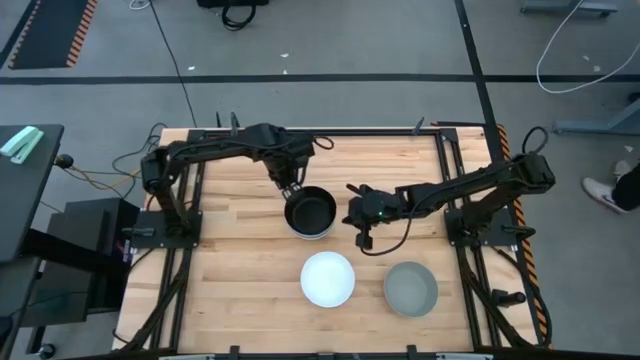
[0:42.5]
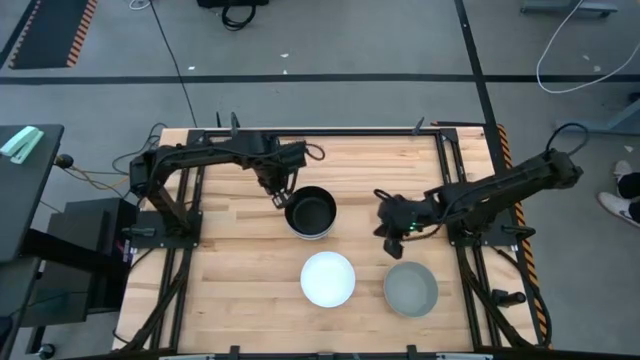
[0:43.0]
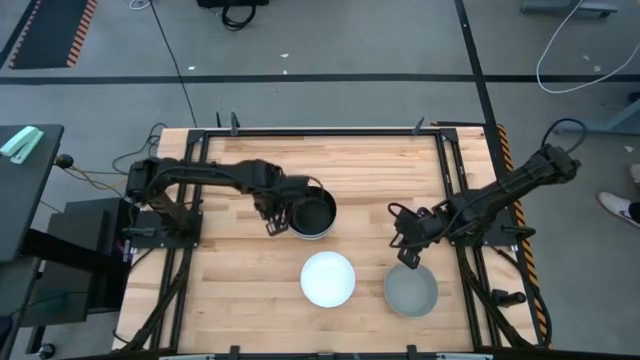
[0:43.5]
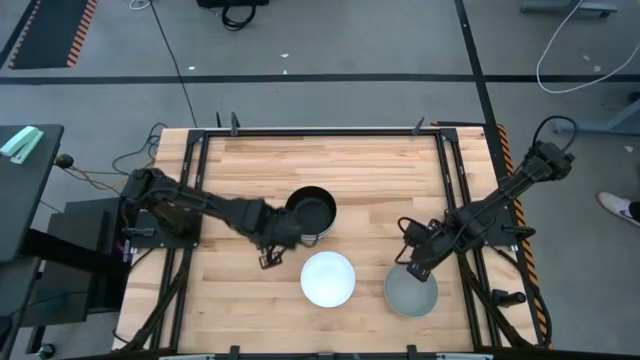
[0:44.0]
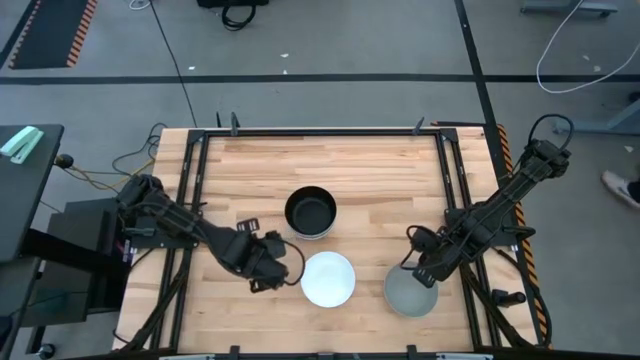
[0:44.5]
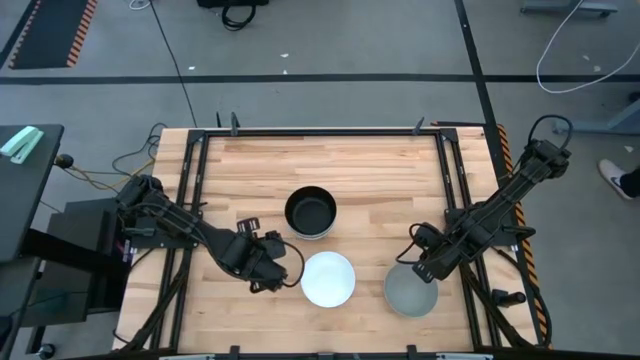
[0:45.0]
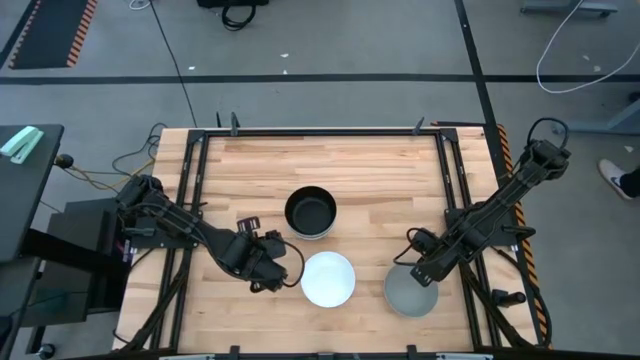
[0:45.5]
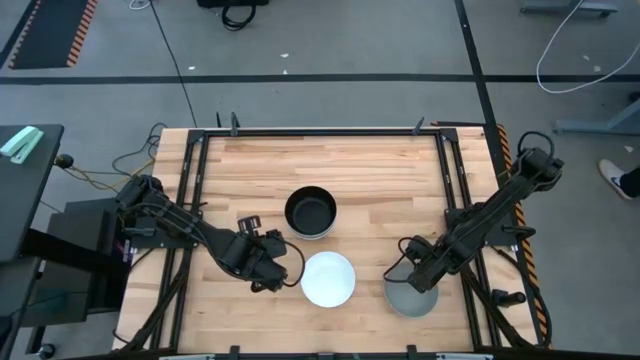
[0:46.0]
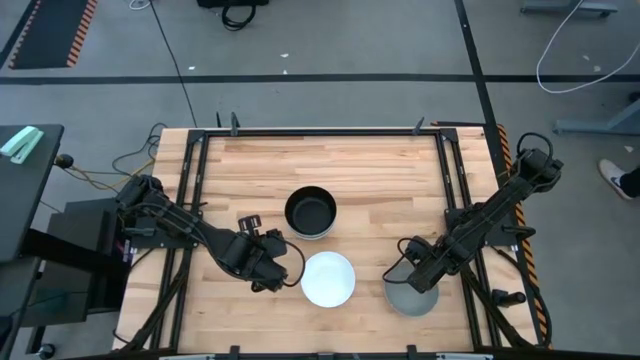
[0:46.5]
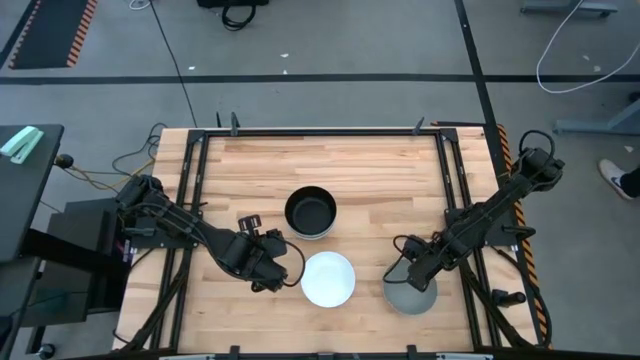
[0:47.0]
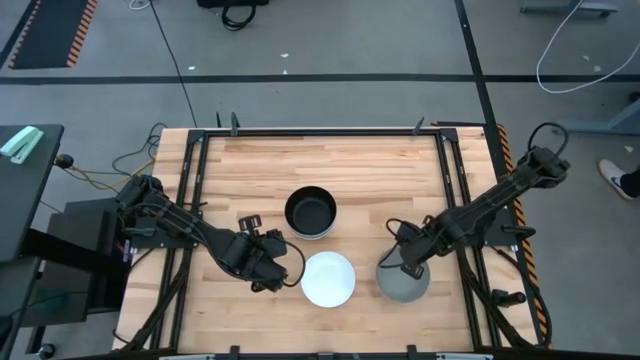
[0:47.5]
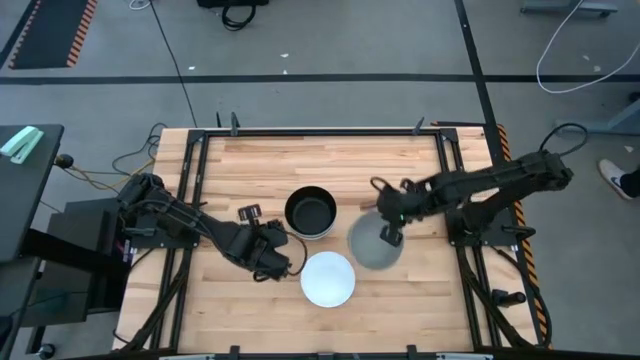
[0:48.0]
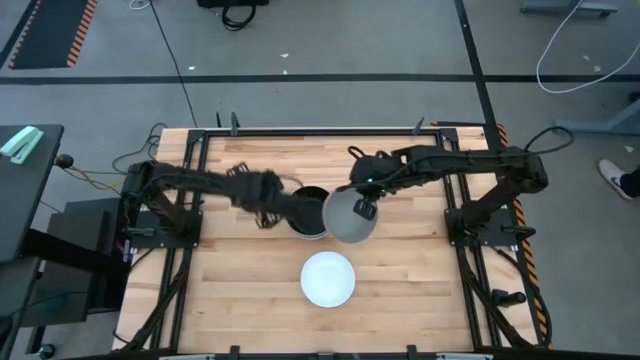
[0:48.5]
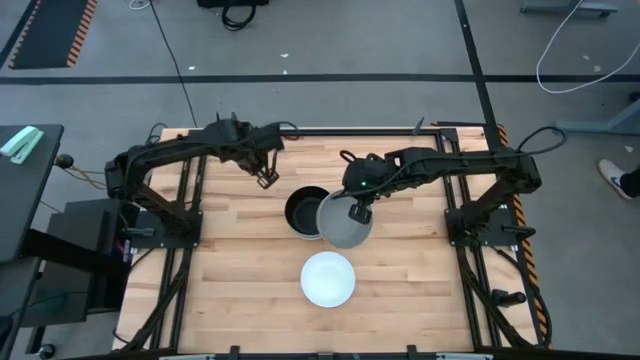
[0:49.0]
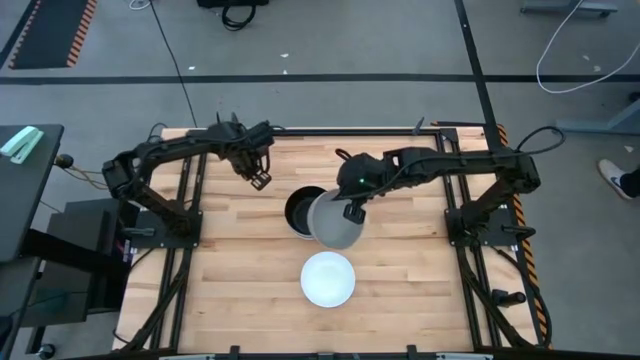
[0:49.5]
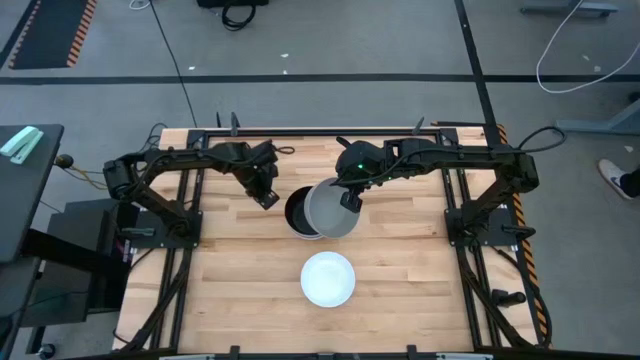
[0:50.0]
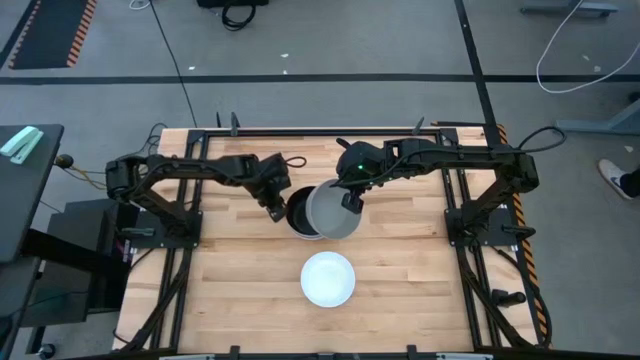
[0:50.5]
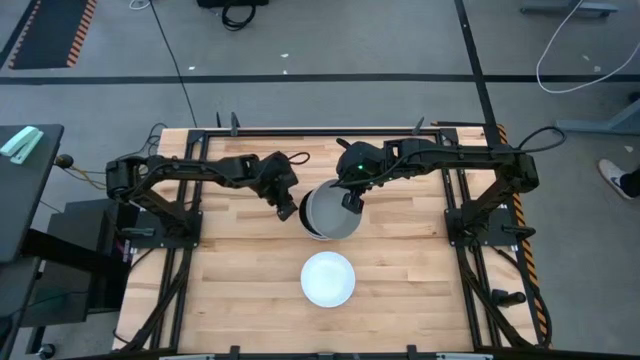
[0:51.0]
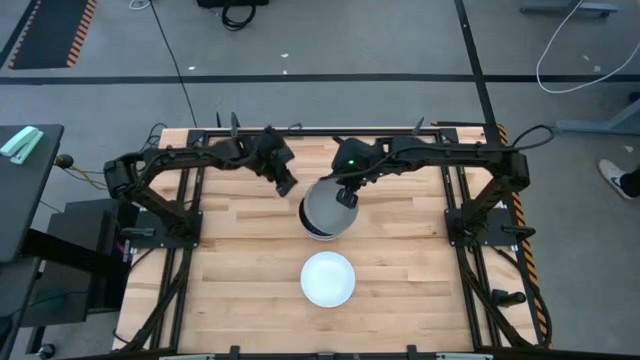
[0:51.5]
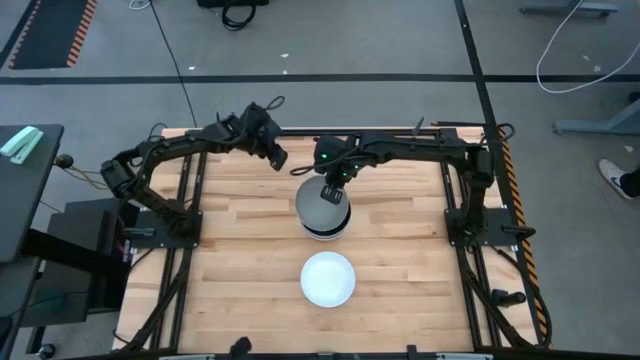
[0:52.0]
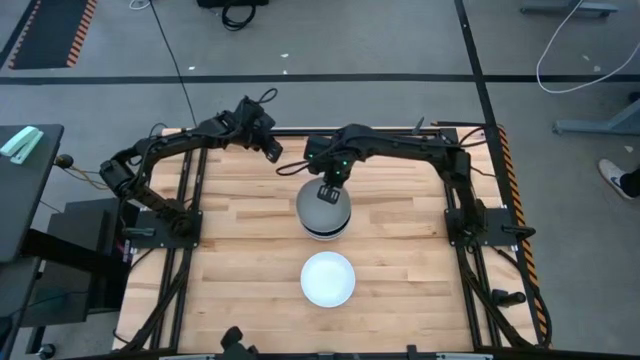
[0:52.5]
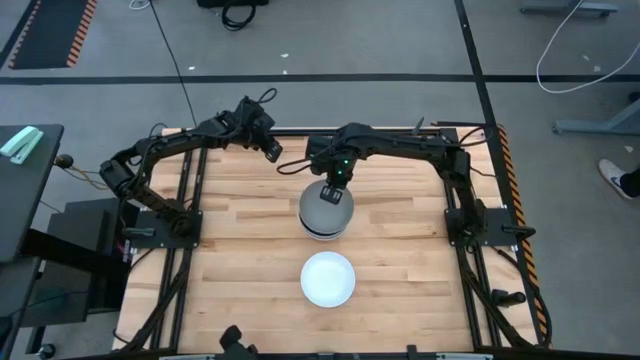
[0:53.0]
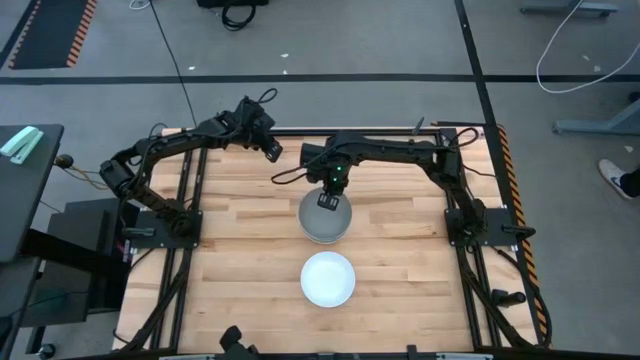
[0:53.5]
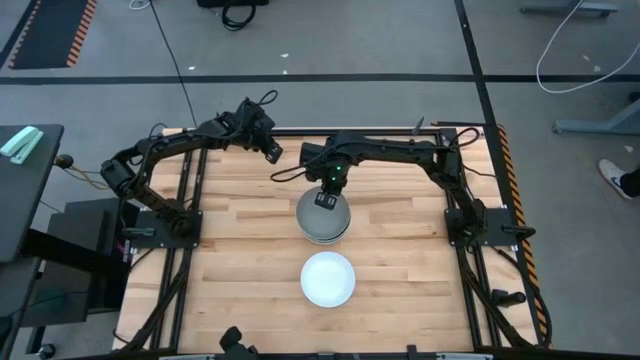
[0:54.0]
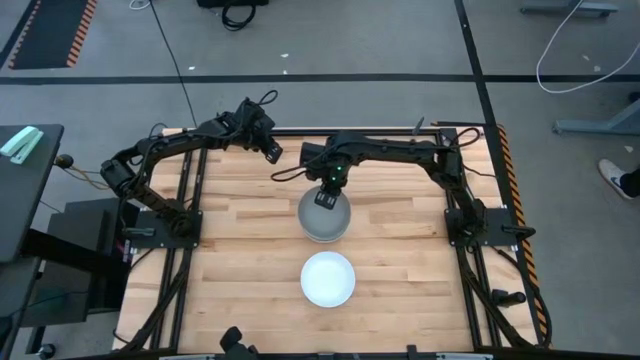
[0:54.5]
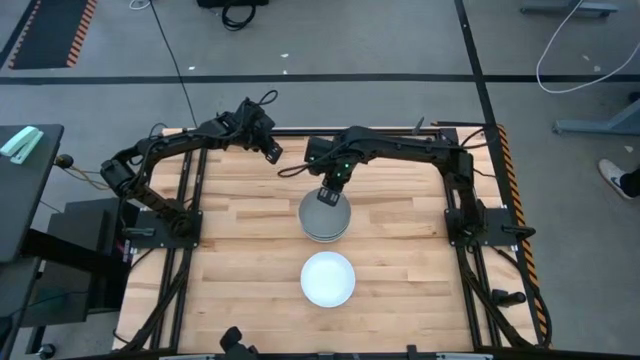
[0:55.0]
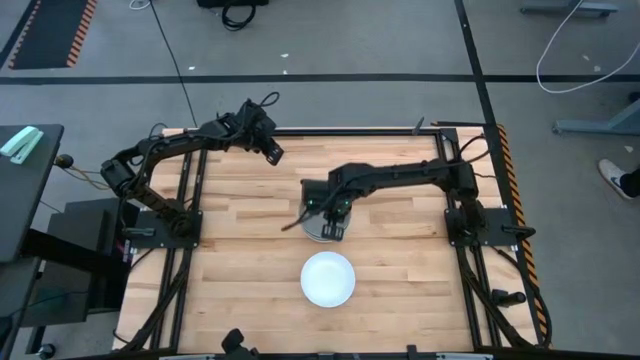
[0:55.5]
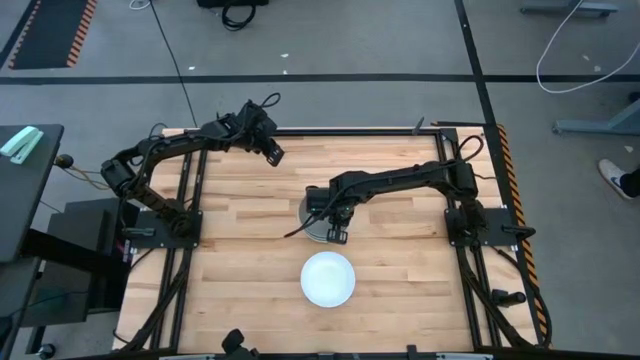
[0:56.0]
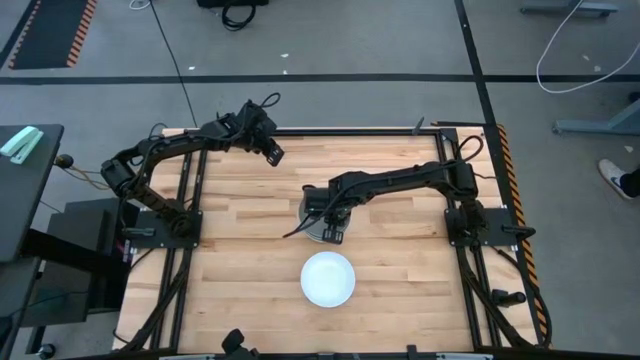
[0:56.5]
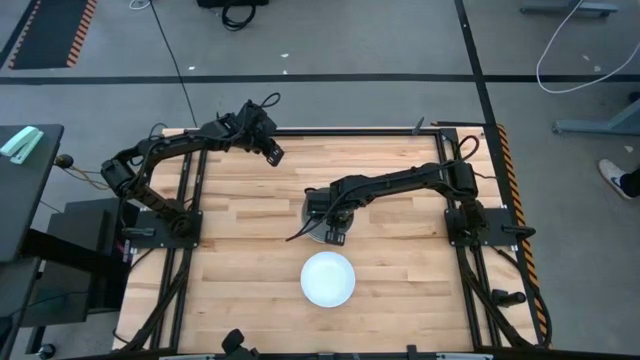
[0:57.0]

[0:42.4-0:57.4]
Task: Nest bowls inside each other
Stack the gray bowl on the black bowl

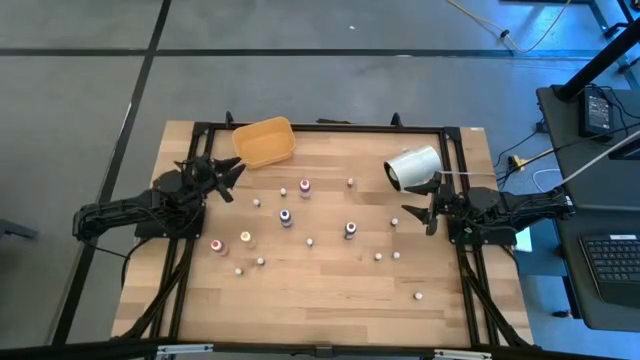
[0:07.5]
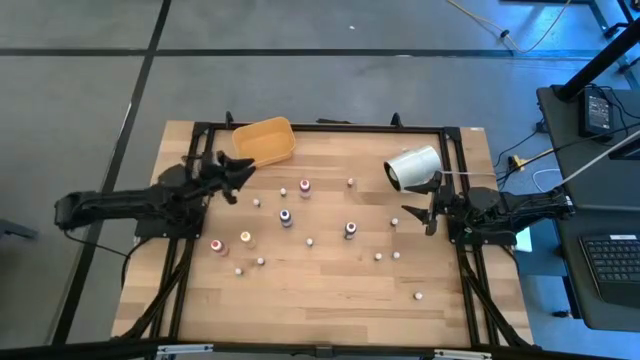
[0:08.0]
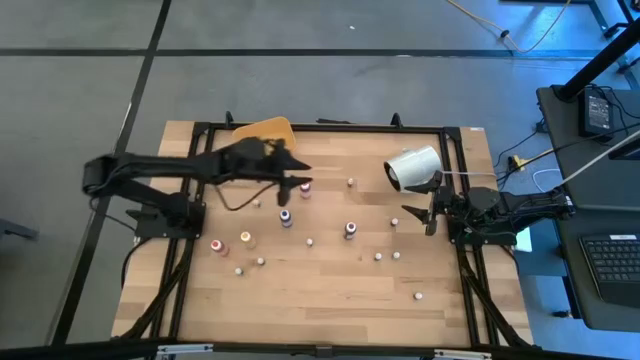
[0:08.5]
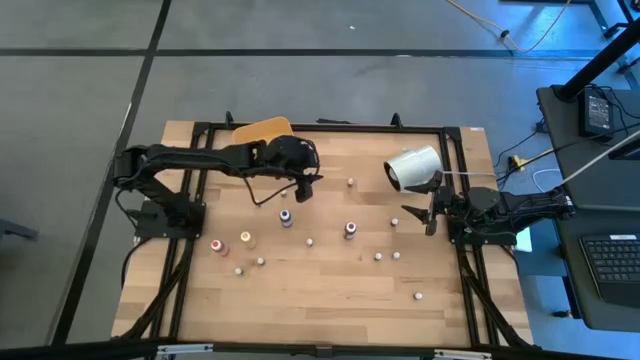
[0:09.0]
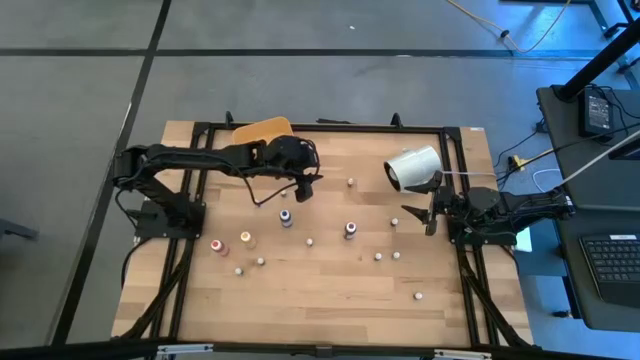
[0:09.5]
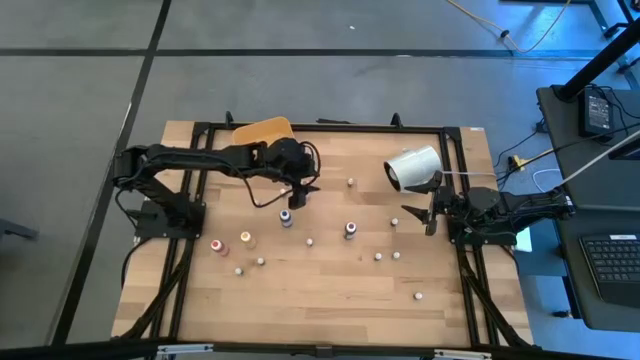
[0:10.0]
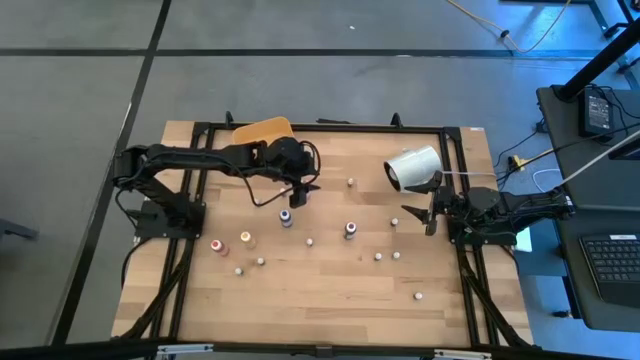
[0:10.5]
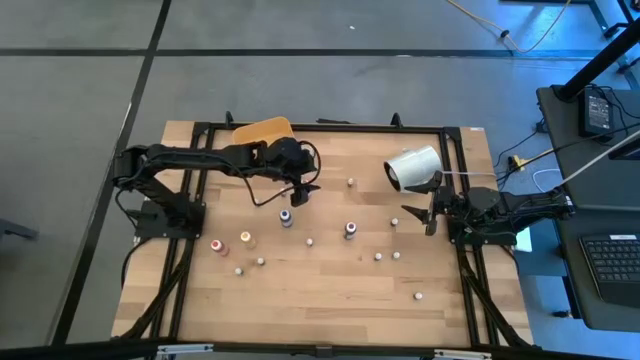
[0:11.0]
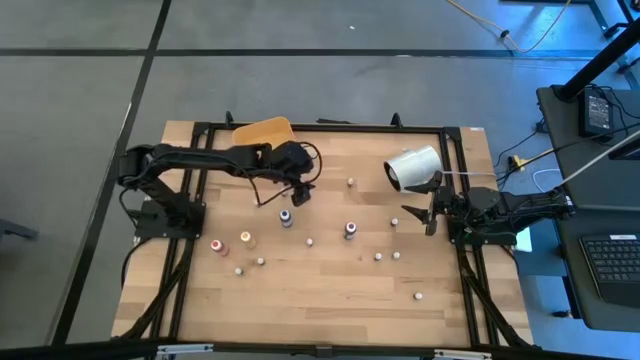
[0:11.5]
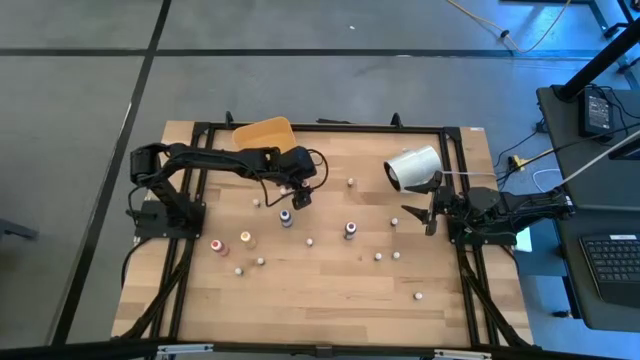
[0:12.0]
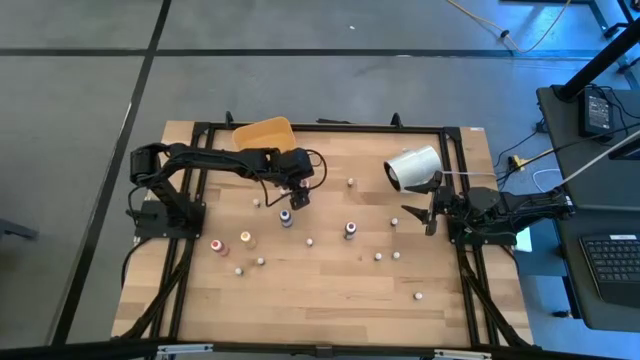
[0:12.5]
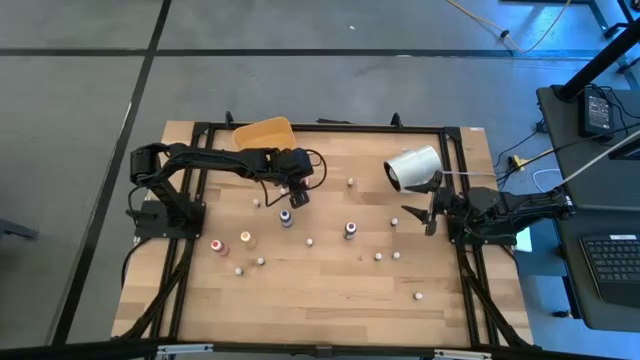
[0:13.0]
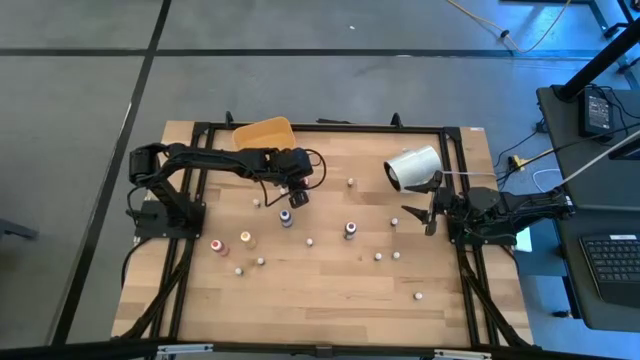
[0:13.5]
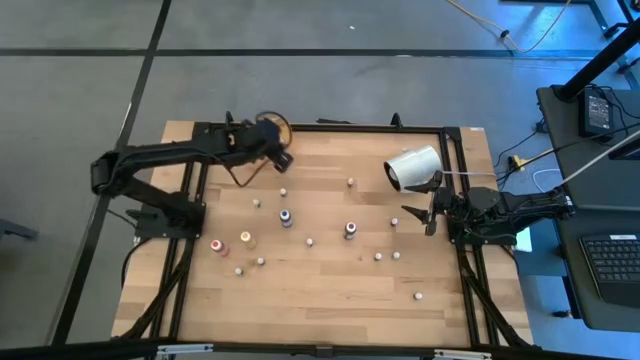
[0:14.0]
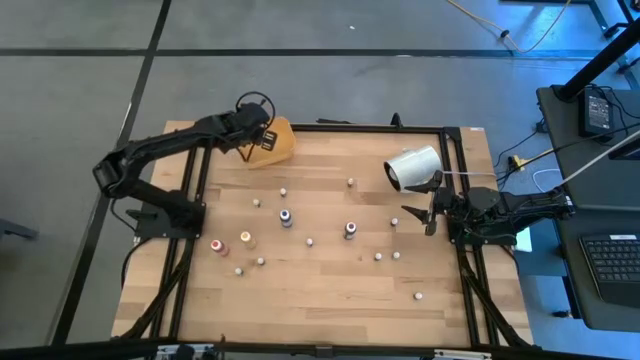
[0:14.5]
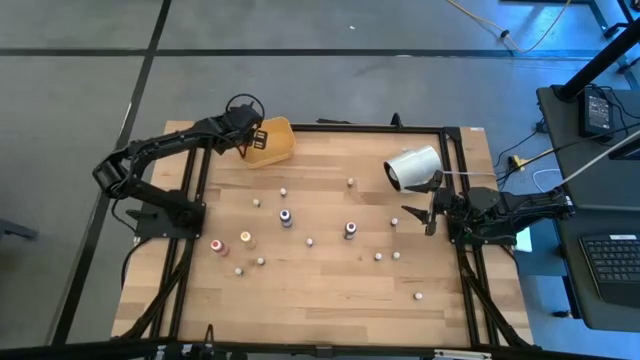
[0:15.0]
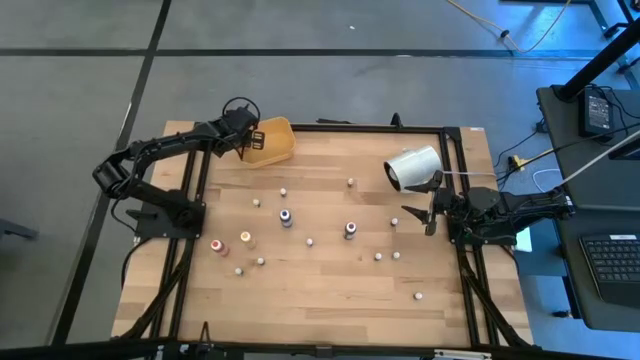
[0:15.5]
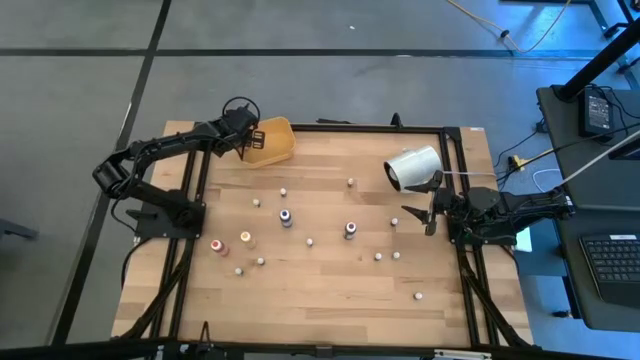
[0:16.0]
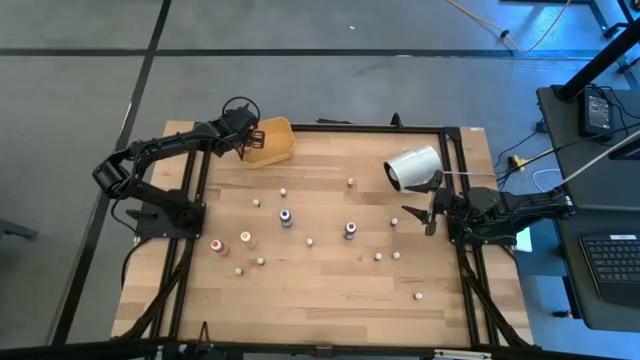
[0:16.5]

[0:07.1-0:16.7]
Task: Pick & Place food coloring
Put the large pink food coloring bottle into the yellow bin
